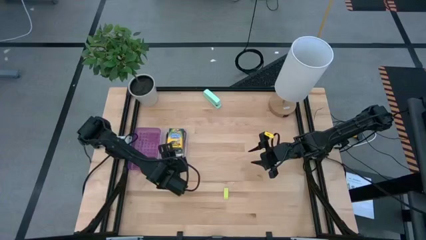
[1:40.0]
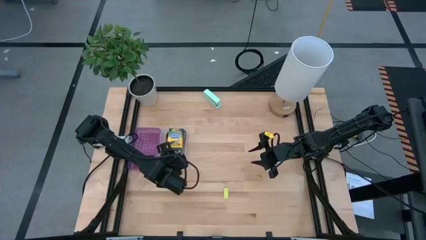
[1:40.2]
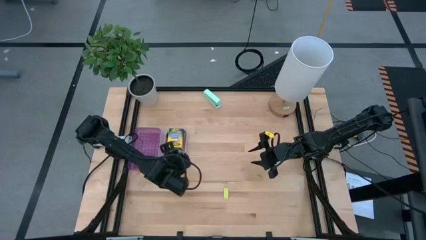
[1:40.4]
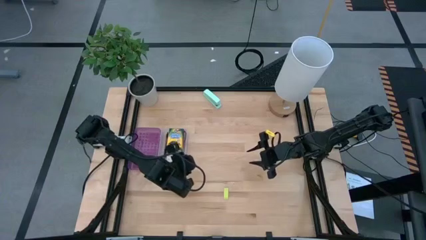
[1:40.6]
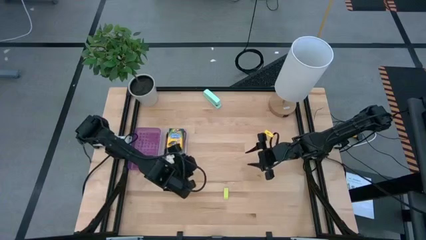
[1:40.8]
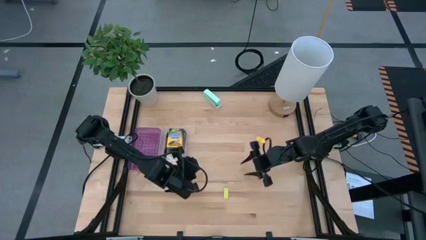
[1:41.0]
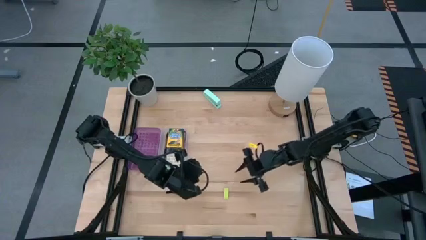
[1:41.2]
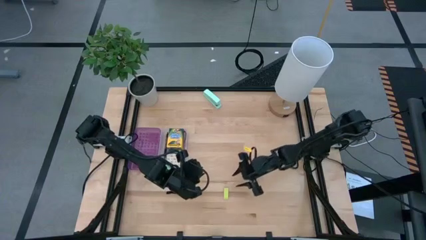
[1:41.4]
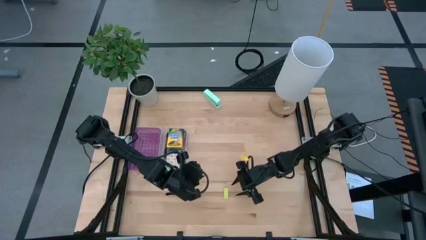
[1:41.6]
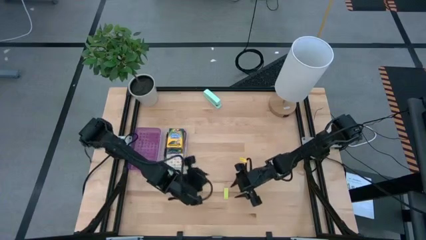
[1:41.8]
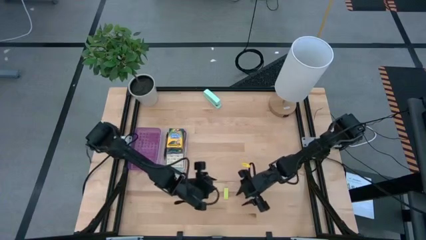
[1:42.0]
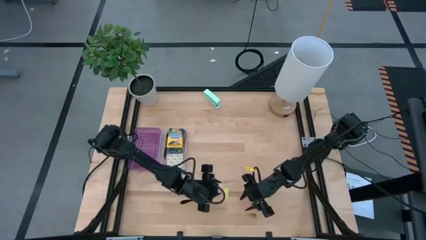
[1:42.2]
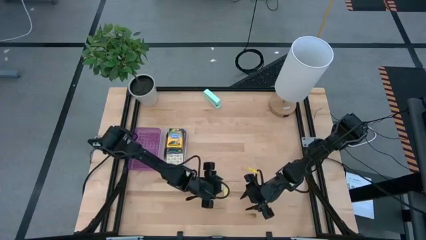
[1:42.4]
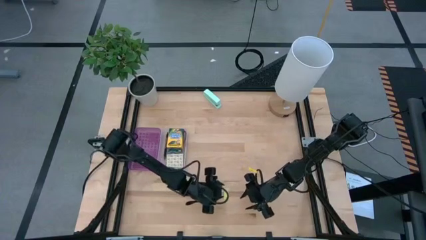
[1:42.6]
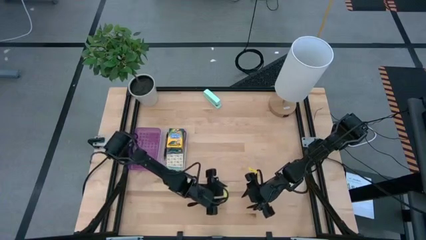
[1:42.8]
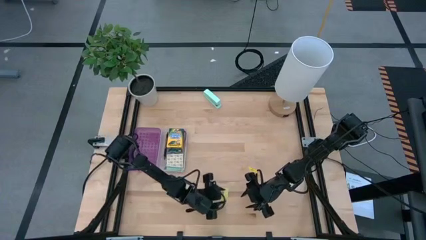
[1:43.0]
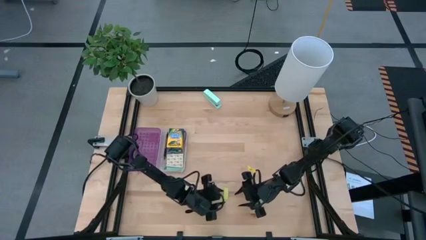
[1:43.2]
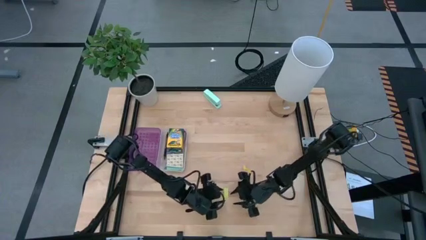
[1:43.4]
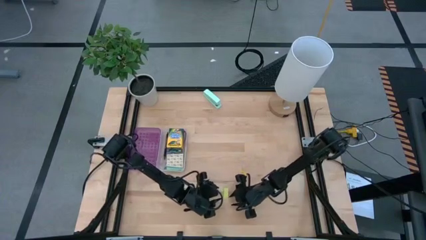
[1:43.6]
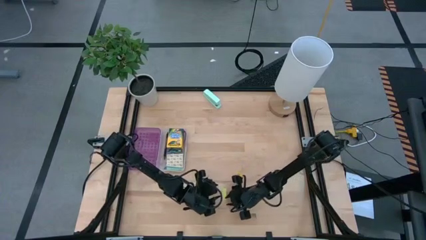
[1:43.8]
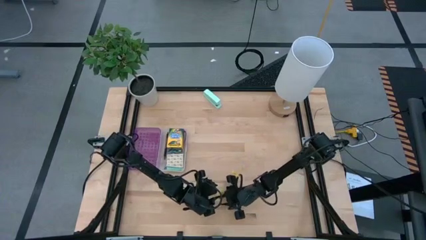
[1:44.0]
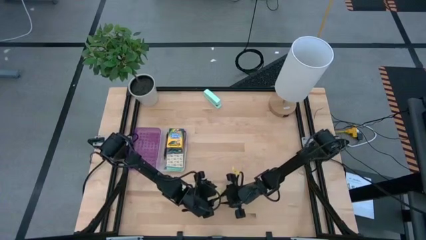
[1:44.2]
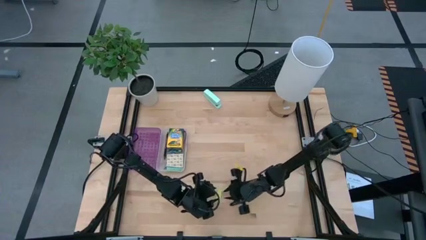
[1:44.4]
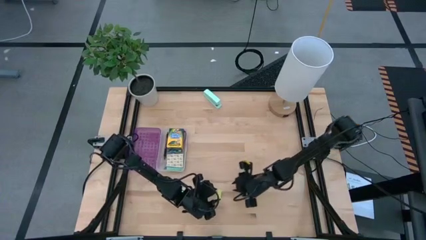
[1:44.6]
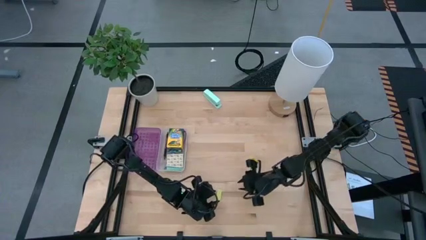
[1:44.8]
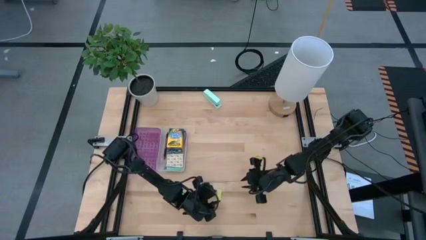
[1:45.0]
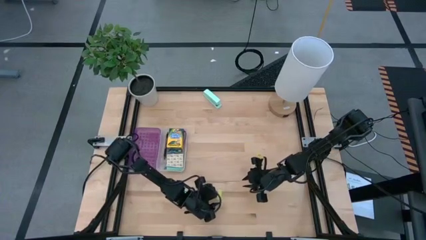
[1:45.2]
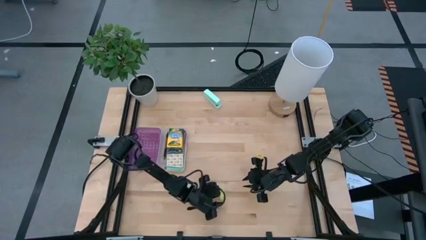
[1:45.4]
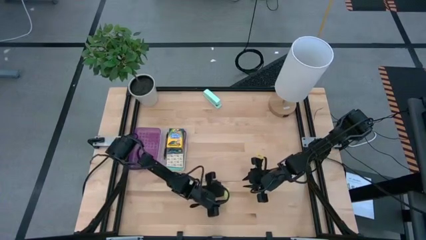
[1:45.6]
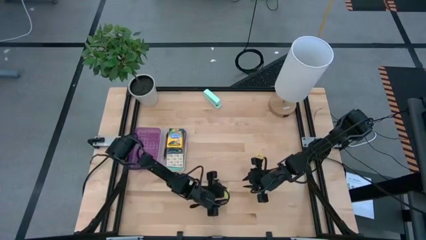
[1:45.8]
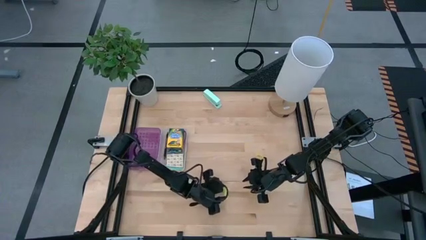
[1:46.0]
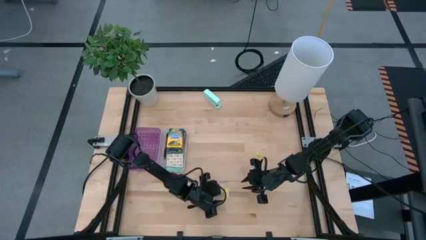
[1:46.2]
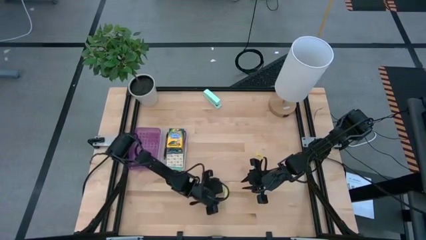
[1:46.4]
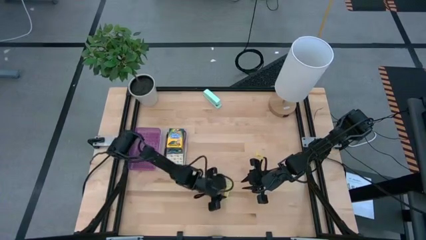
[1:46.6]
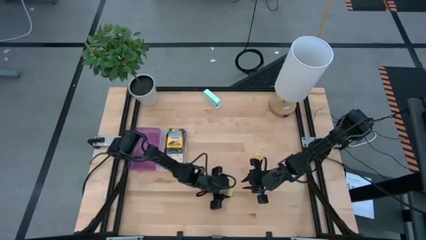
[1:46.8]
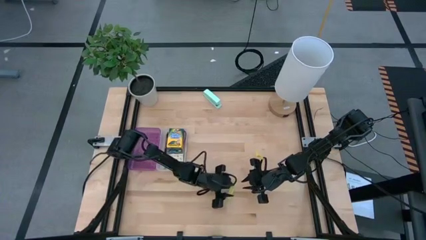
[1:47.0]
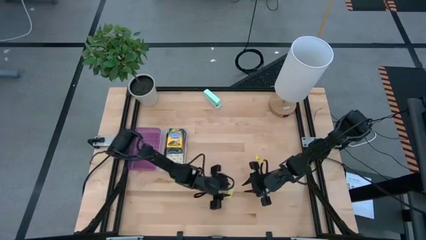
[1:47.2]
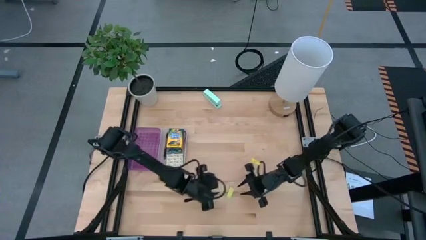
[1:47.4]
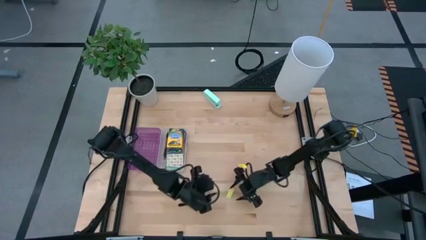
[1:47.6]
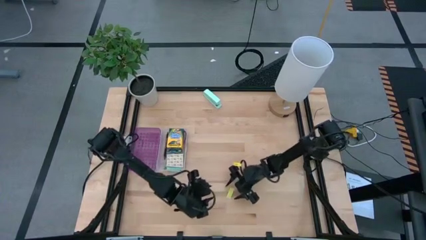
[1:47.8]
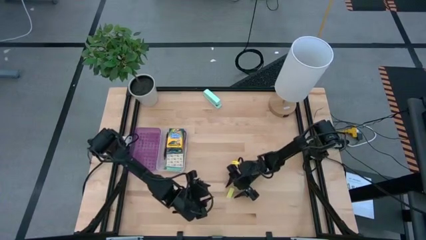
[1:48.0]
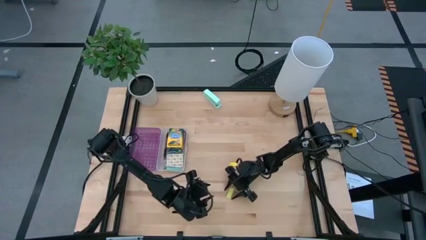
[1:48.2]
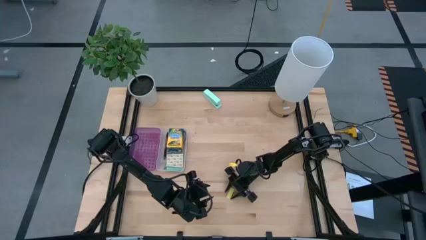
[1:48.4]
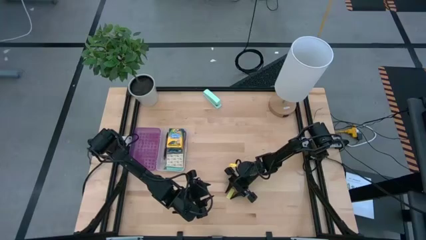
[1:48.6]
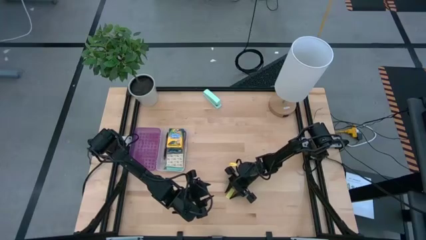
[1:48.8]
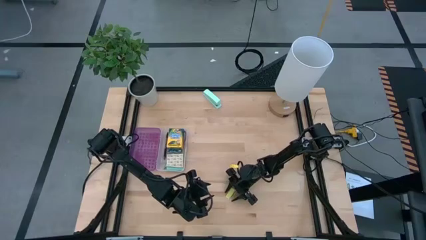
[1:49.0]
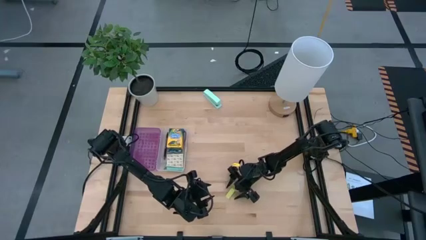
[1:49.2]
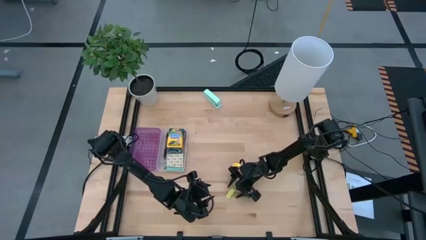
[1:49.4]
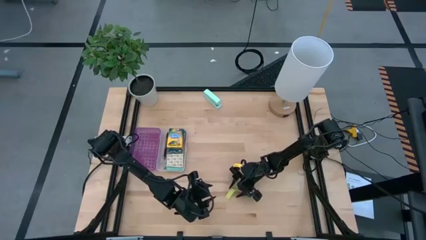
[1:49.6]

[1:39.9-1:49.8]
Task: Pack school essentials
Put the light green eraser into the purple supply box

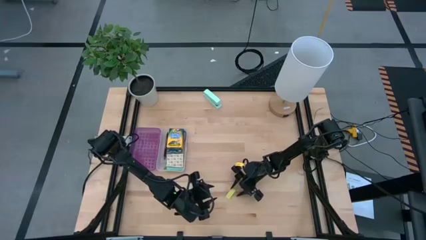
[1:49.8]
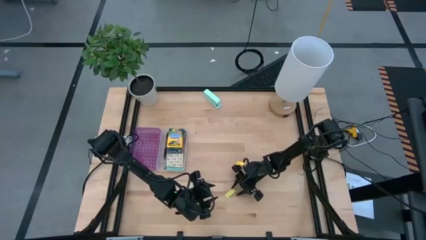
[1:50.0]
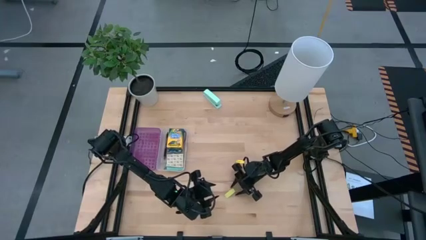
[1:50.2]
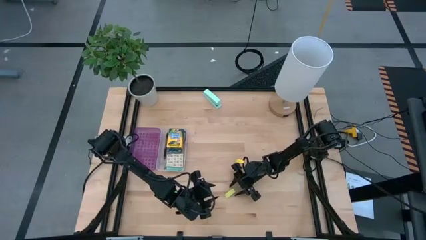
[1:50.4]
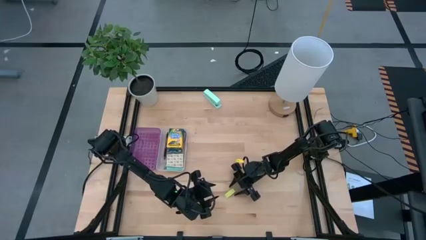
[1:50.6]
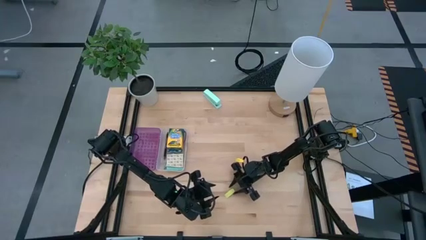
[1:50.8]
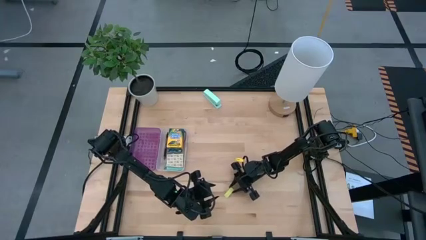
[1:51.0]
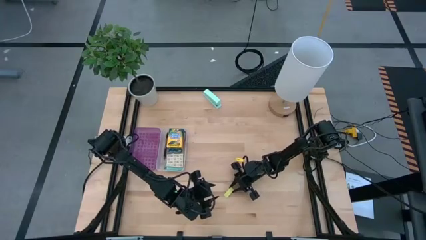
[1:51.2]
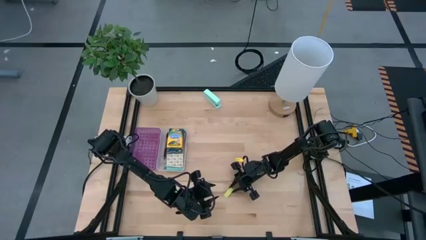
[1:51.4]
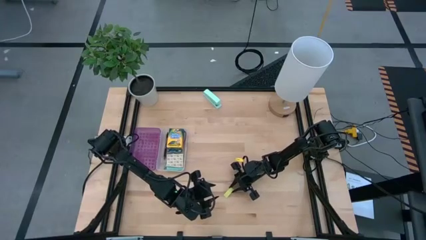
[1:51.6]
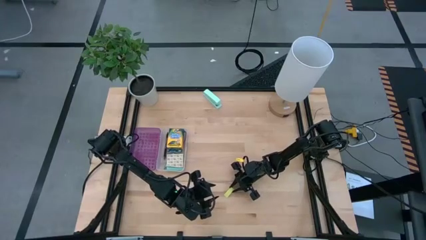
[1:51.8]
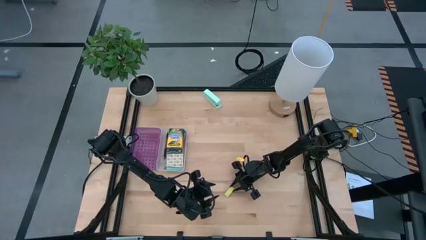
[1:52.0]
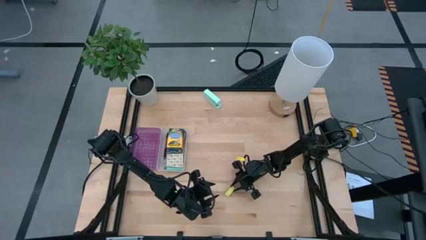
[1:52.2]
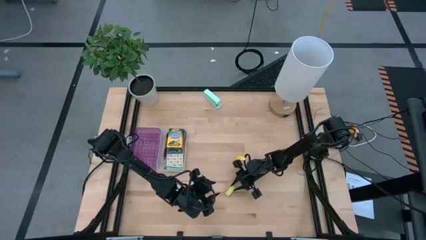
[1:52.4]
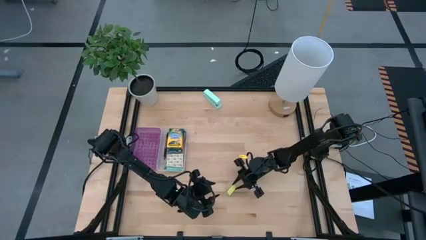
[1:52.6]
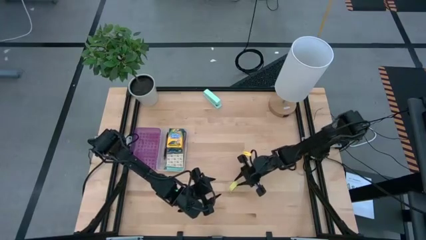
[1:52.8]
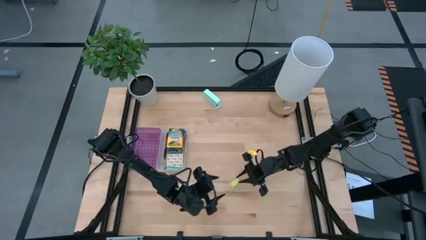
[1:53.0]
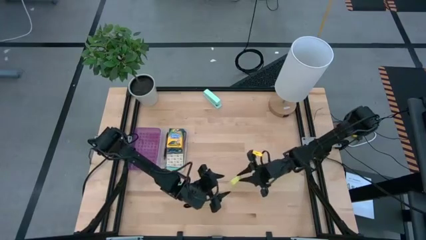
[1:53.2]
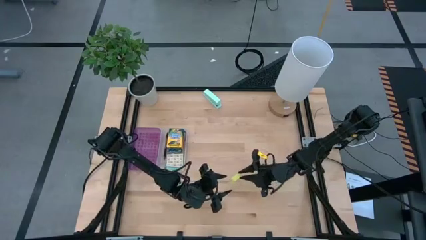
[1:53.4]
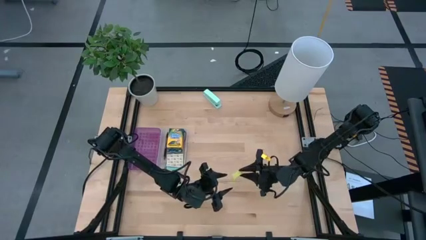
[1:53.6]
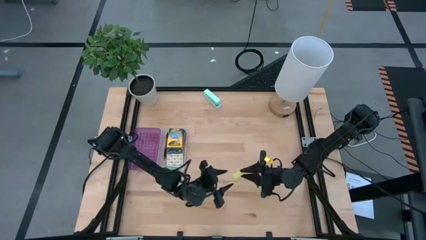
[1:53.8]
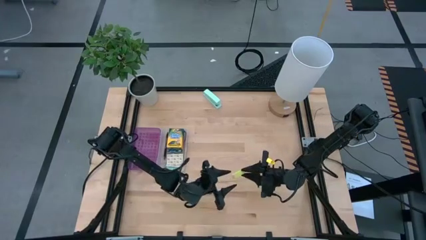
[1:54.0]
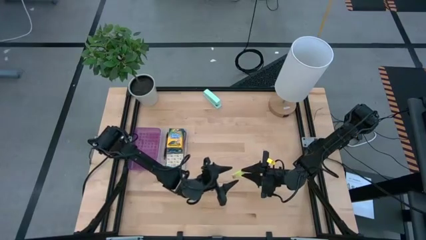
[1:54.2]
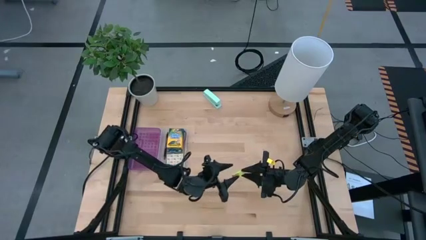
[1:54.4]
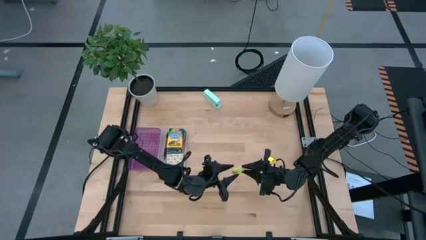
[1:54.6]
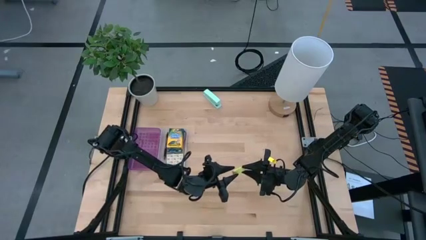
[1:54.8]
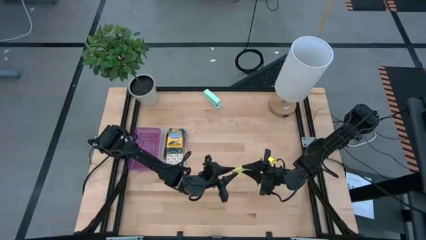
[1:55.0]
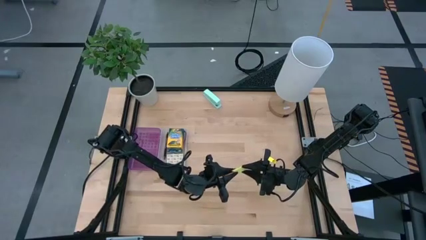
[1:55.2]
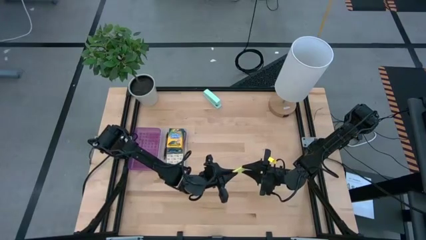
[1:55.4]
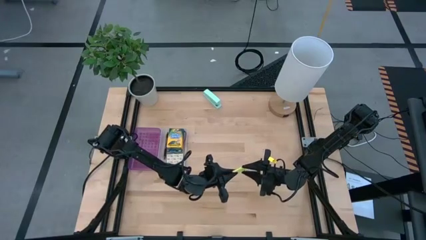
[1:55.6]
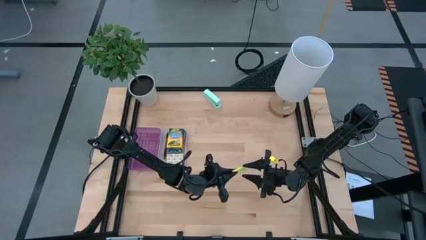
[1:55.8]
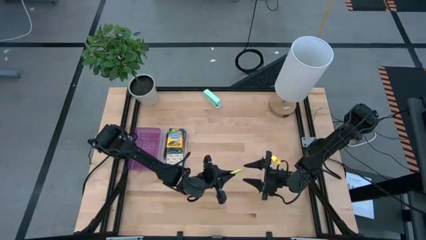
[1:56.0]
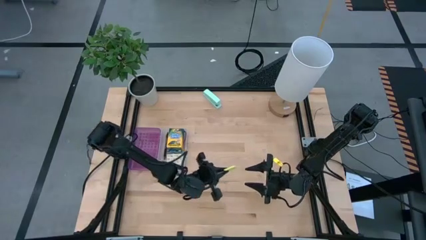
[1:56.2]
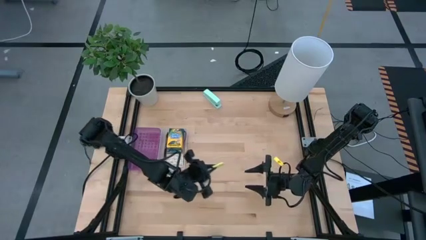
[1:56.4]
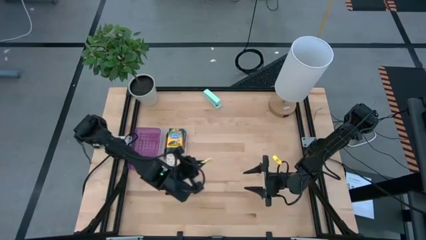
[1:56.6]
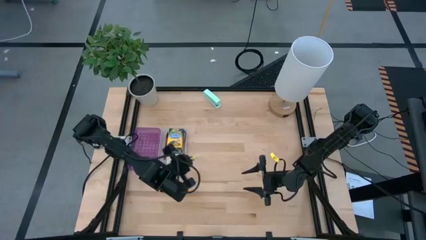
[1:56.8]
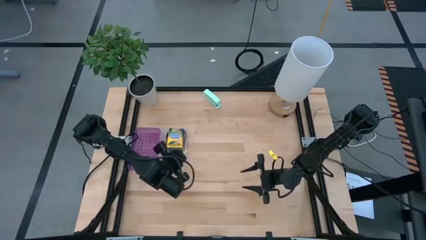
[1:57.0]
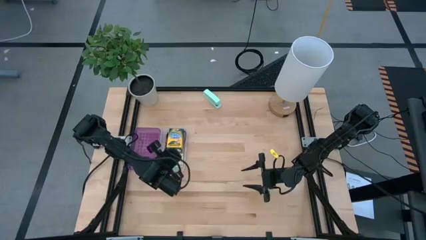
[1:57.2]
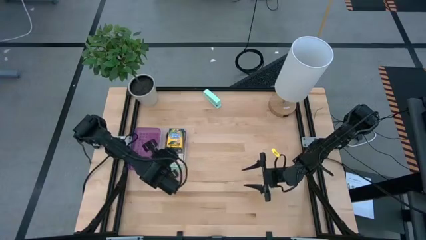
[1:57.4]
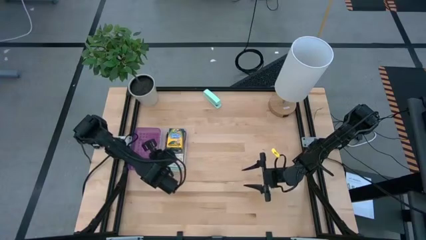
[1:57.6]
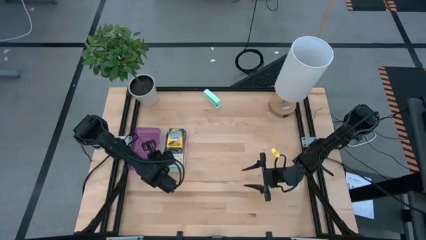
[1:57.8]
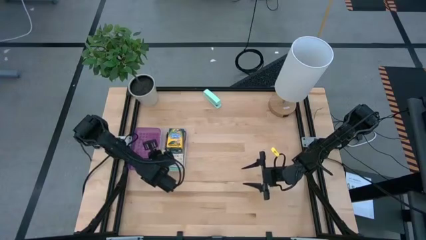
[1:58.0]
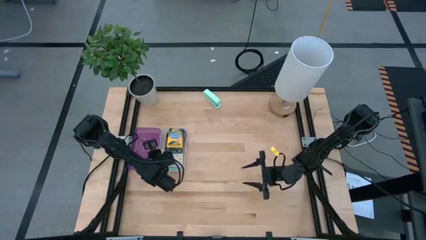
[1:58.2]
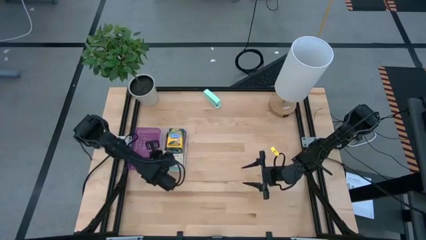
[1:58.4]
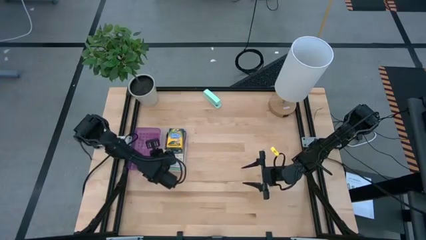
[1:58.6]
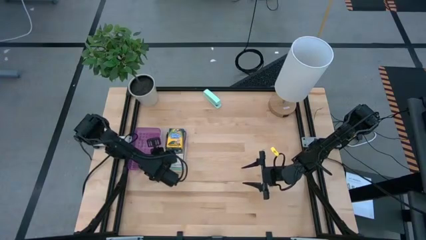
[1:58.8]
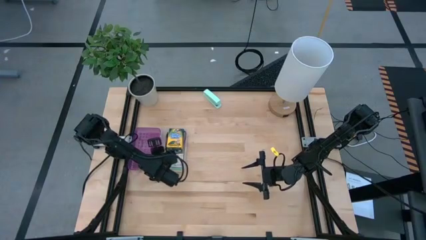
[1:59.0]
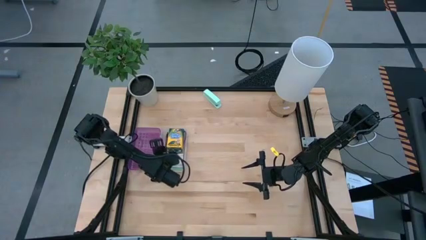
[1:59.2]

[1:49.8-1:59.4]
Put the light green eraser into the purple supply box
